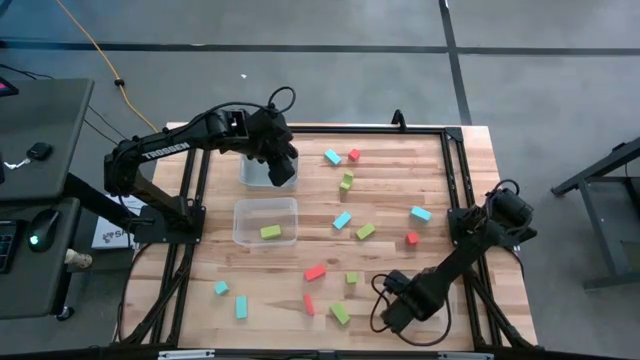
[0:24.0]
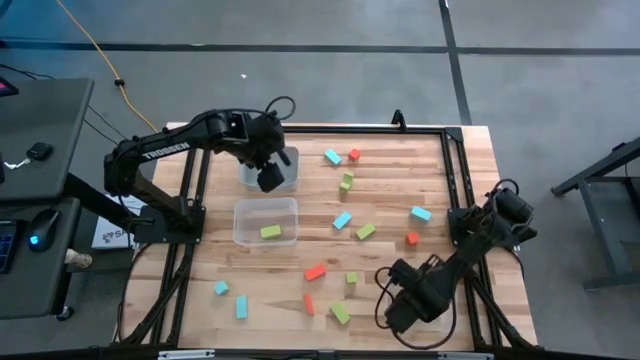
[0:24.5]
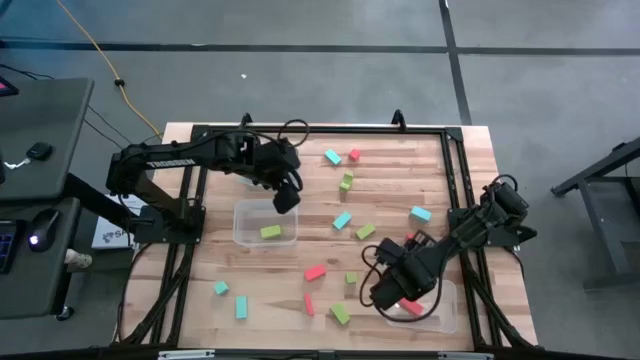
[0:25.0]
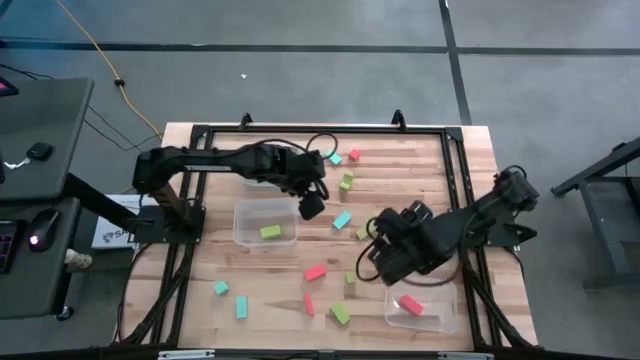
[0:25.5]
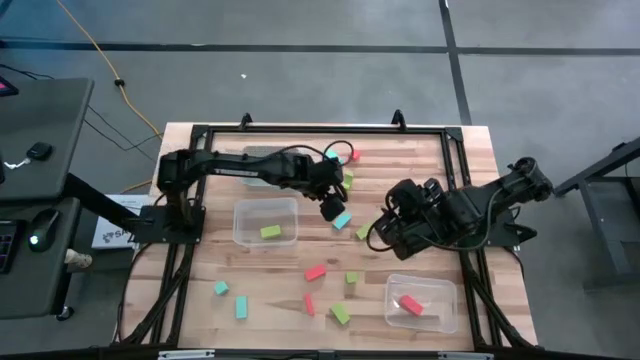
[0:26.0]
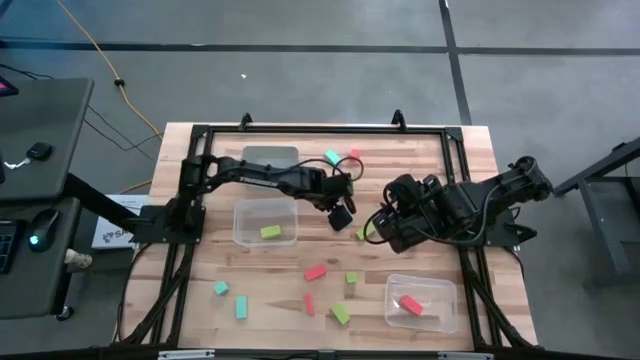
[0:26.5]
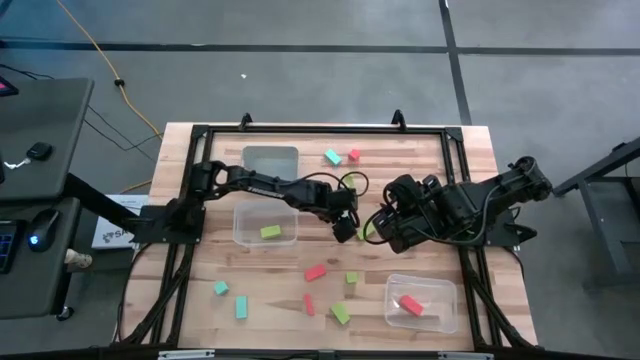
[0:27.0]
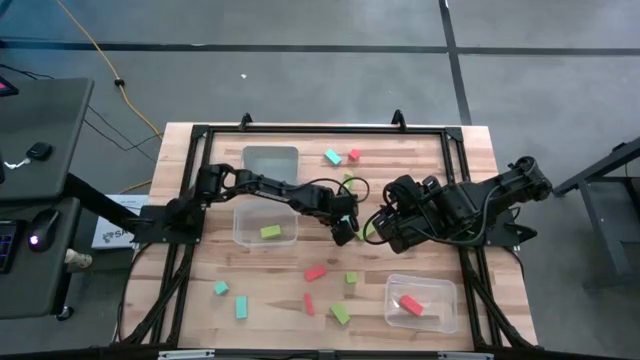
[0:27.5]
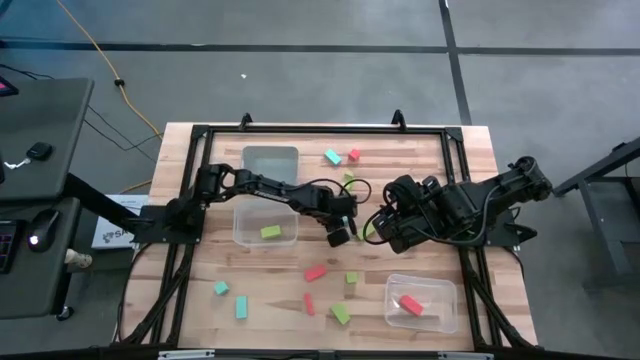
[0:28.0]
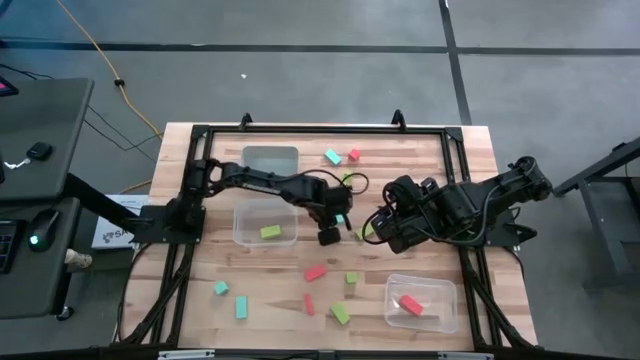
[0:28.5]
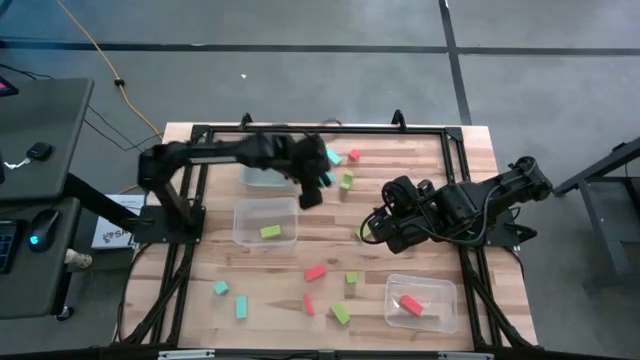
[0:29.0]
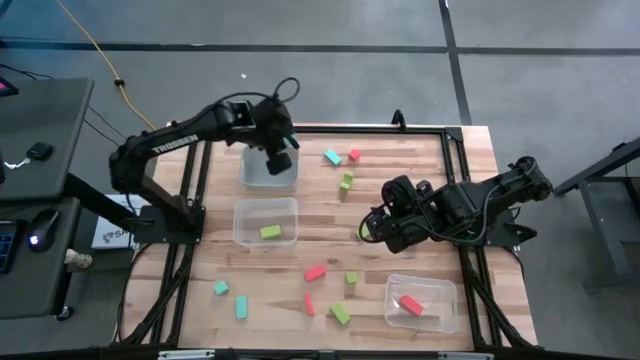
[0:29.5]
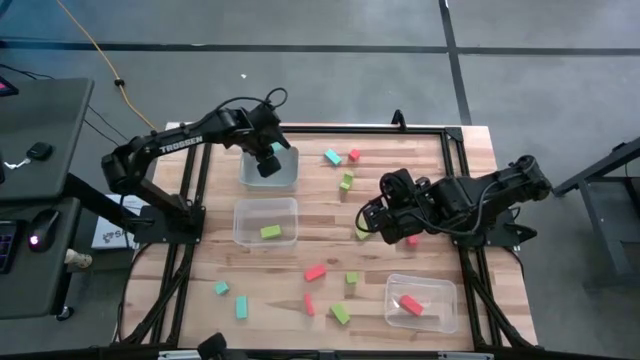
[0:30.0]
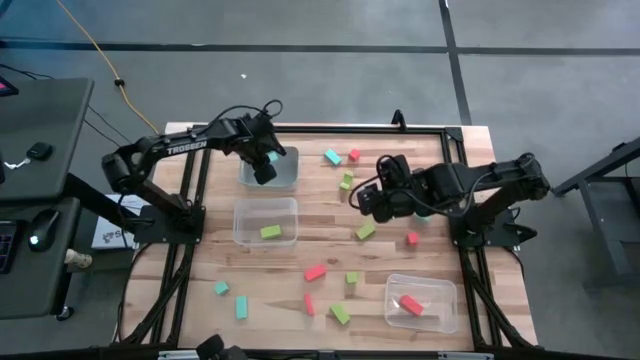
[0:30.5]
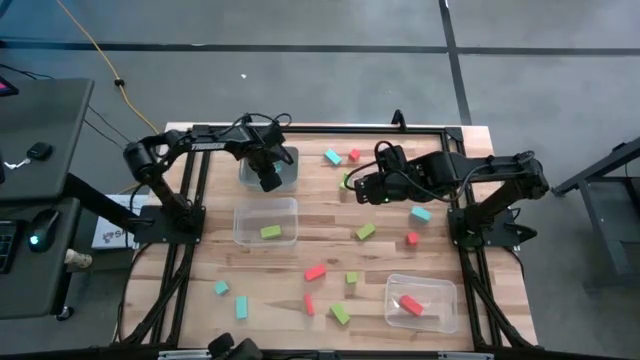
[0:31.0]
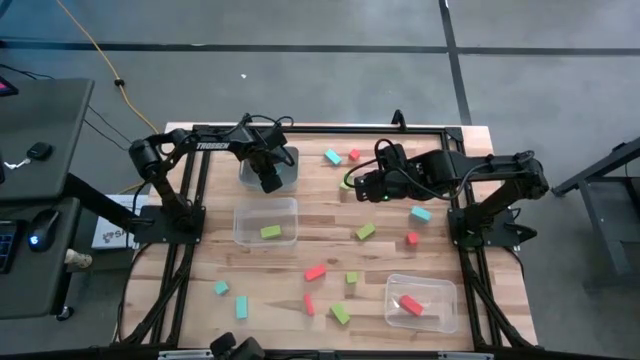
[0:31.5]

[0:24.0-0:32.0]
Task: Sort & place blocks by color
Put the blue block into the gray bin

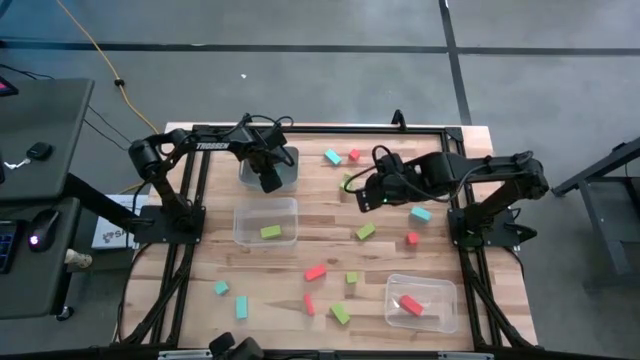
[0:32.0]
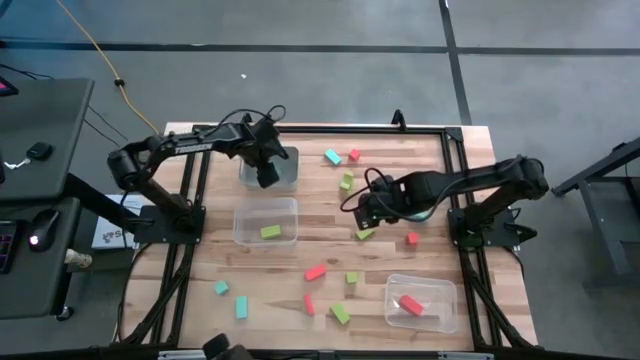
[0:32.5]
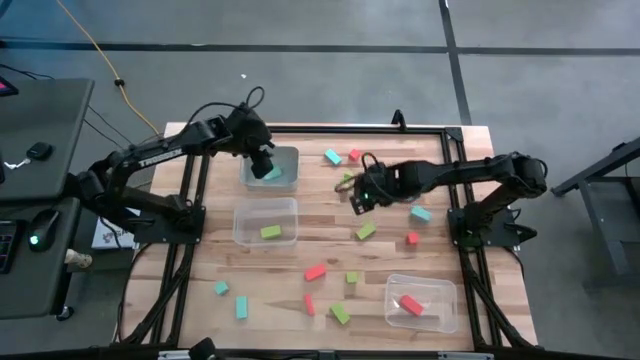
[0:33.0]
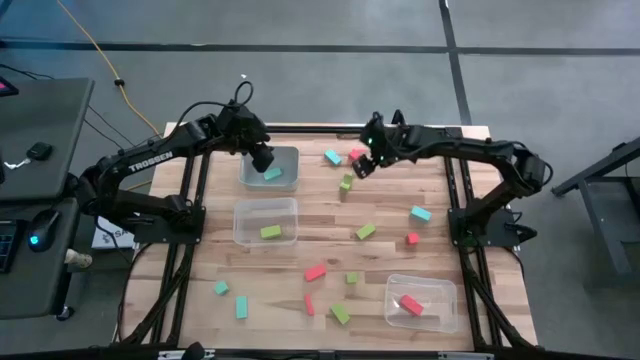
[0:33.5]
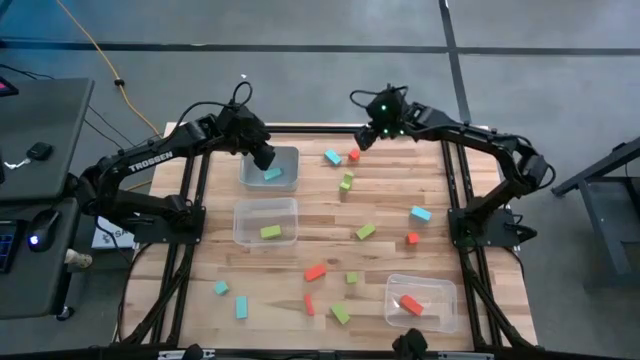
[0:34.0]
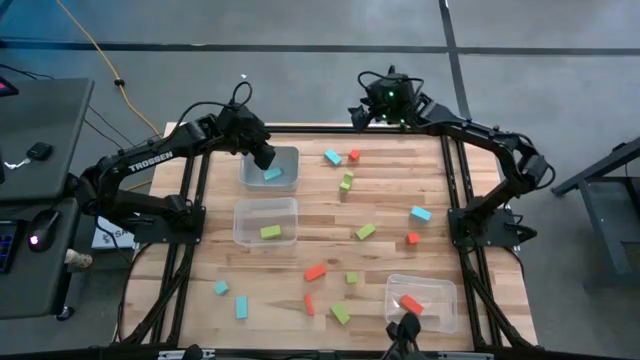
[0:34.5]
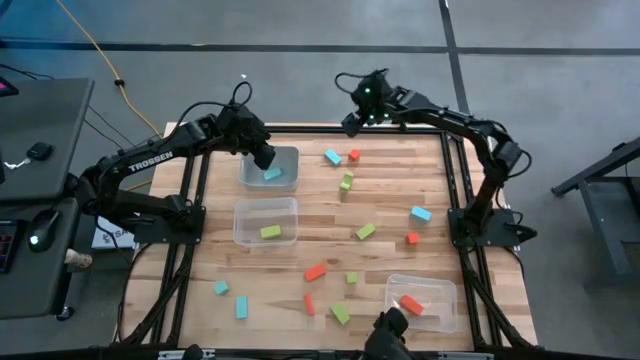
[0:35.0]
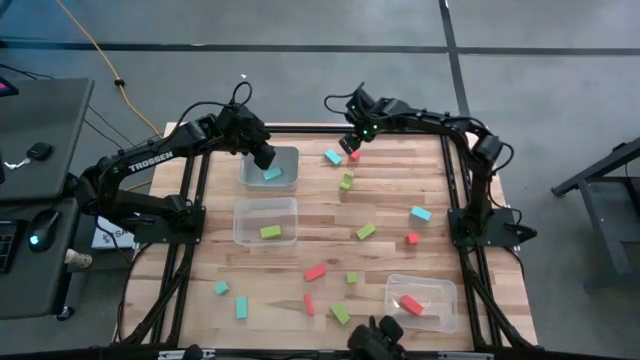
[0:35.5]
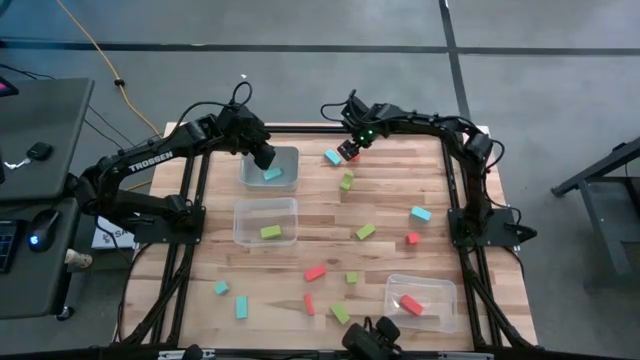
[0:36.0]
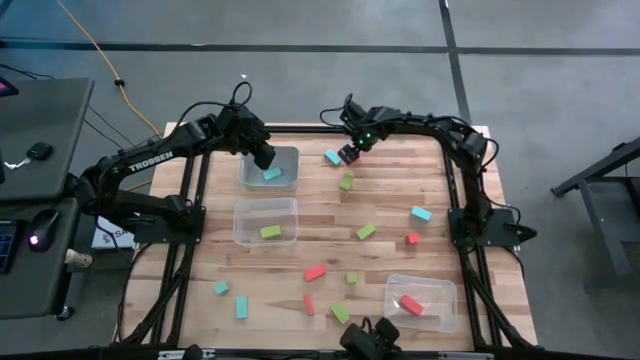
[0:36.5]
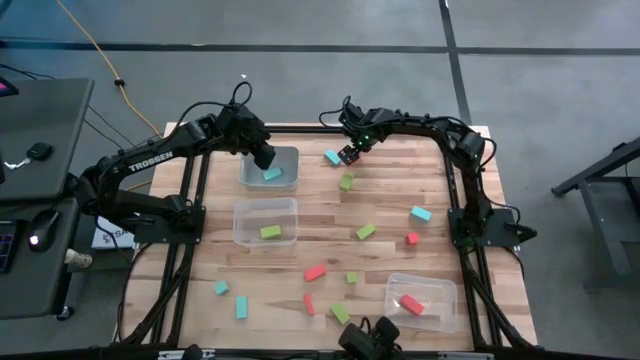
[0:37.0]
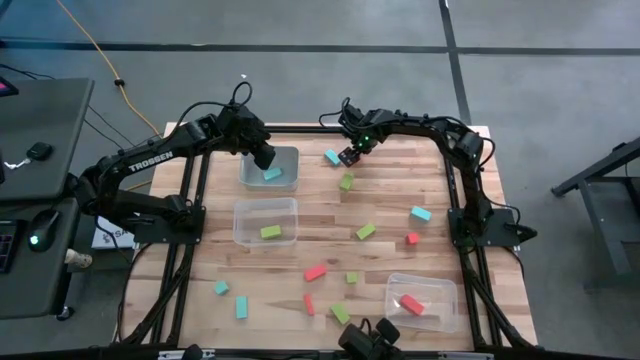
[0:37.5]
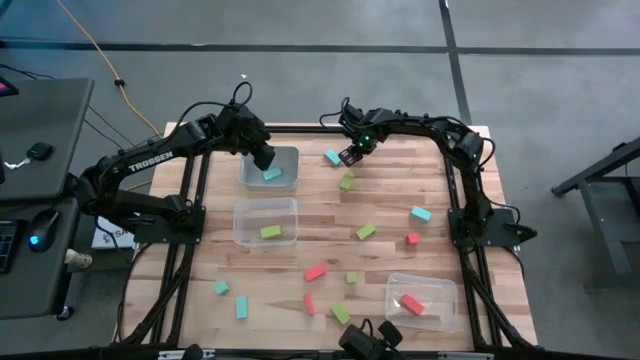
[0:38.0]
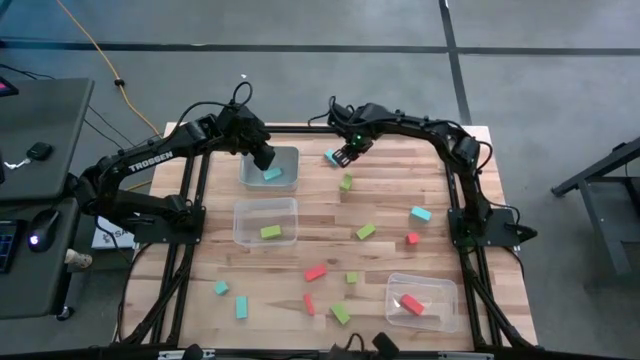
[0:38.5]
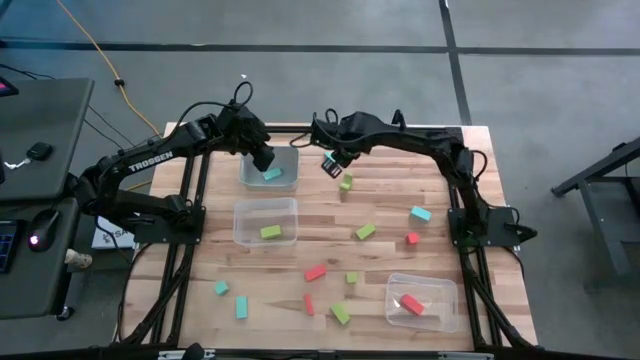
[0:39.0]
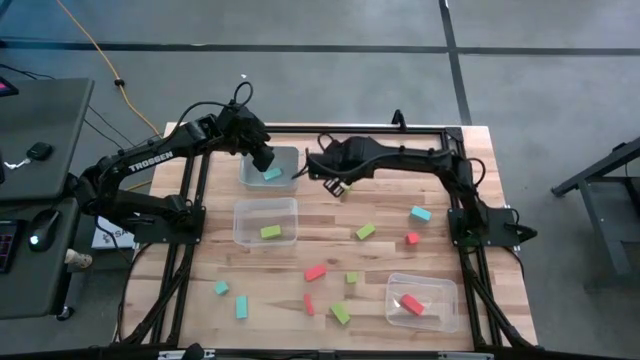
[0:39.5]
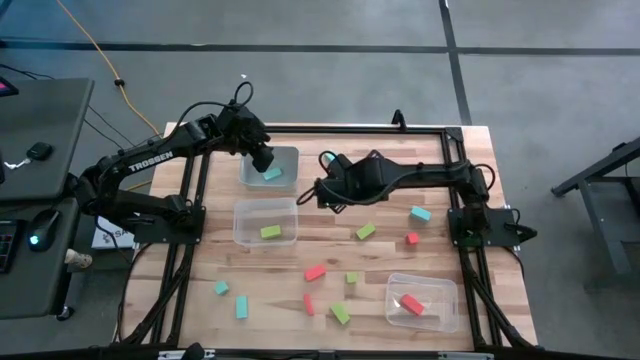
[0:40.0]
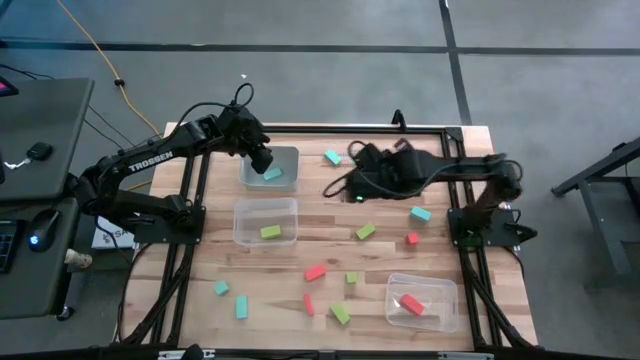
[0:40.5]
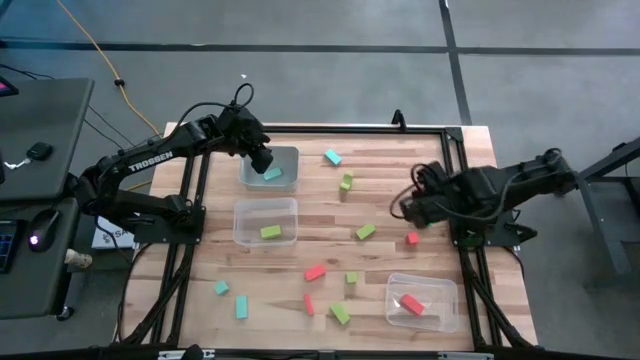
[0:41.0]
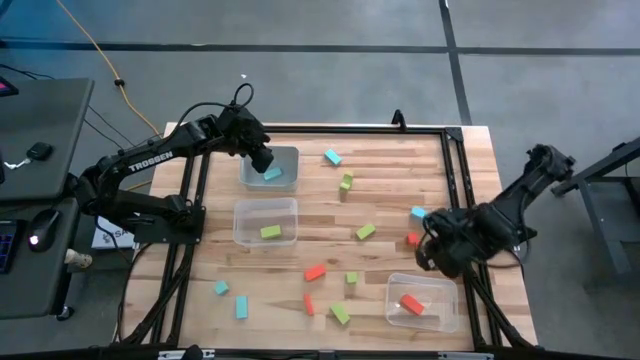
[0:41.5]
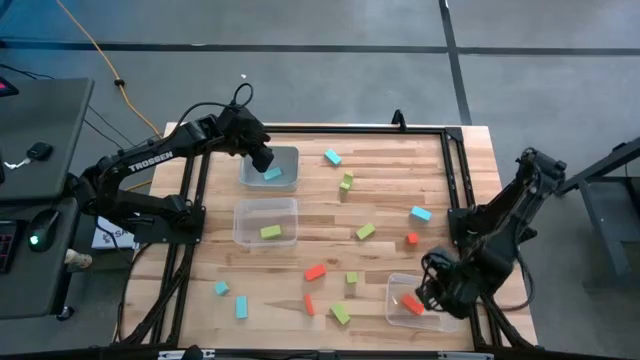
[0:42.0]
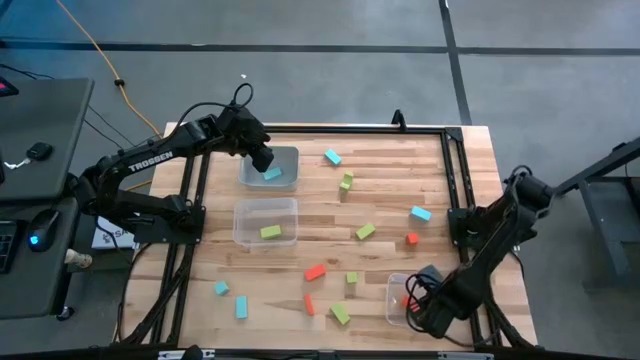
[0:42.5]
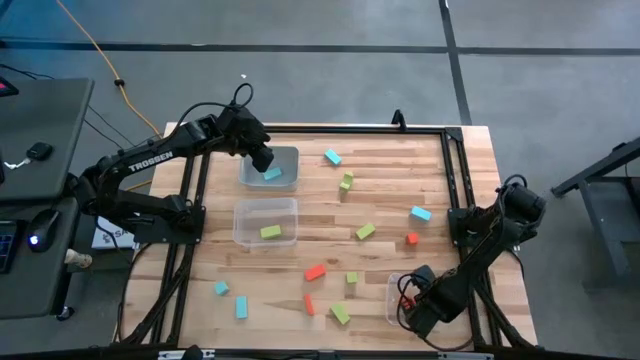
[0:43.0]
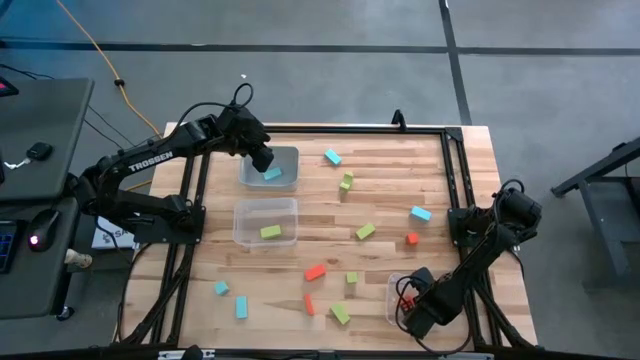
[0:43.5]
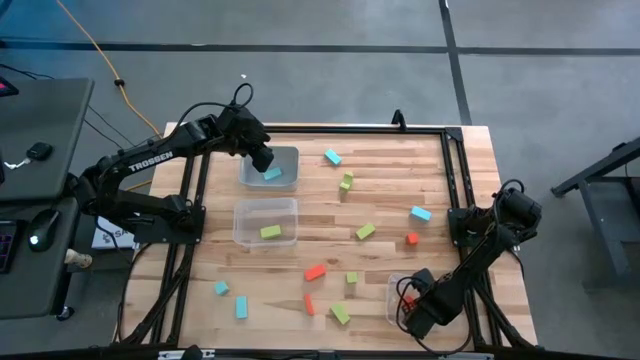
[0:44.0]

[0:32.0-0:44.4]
Put the orange block into the right transparent bin
